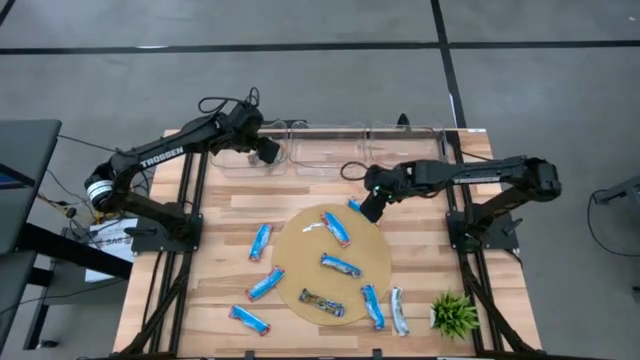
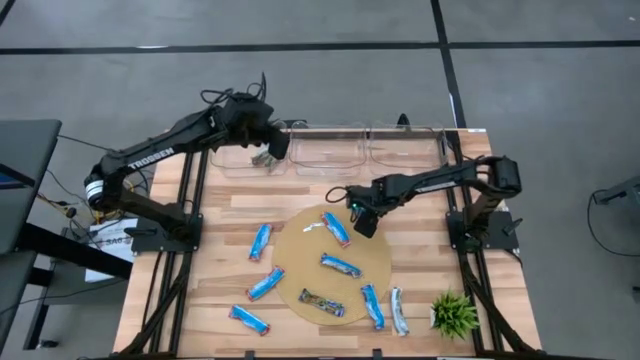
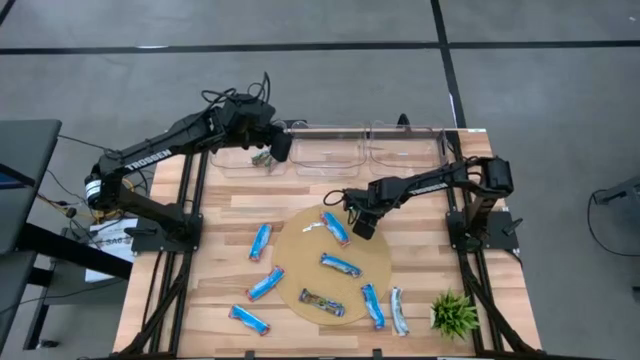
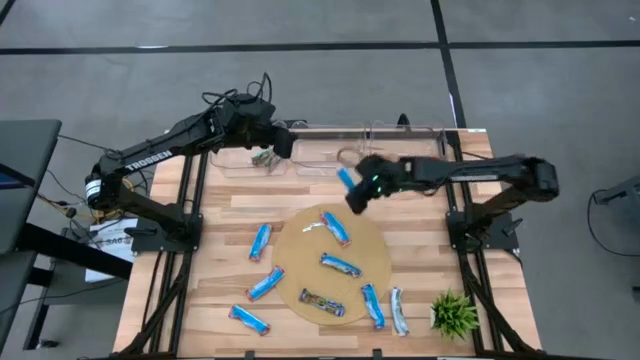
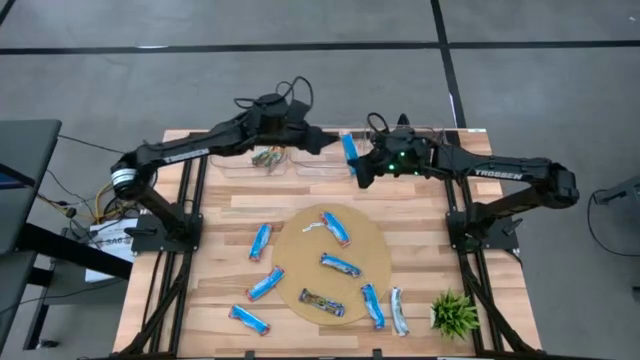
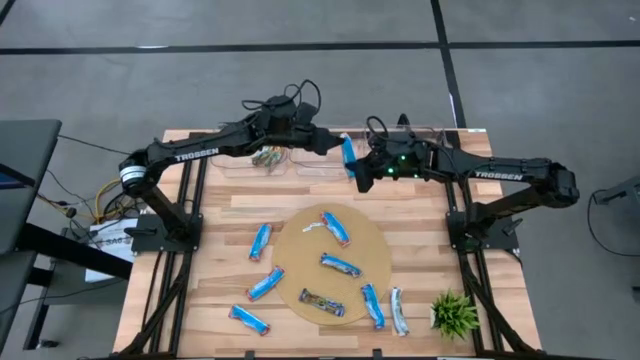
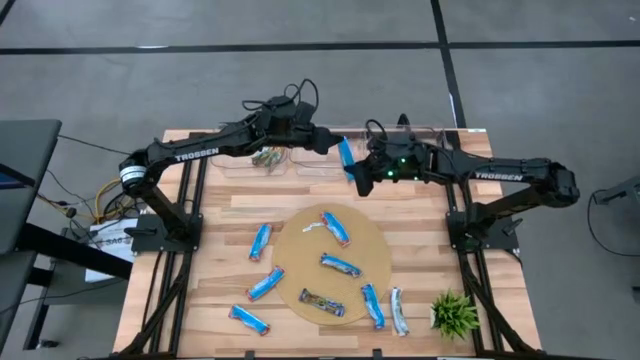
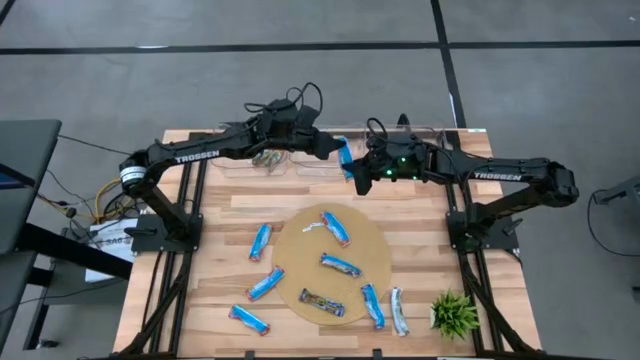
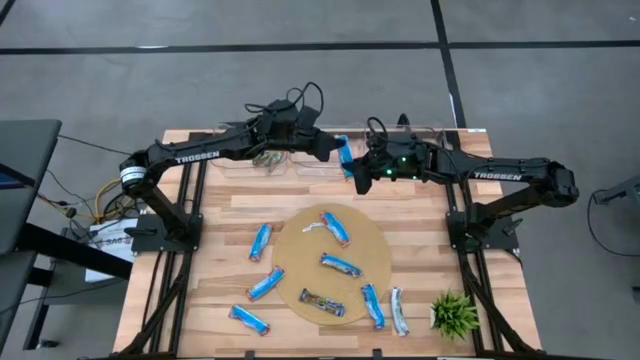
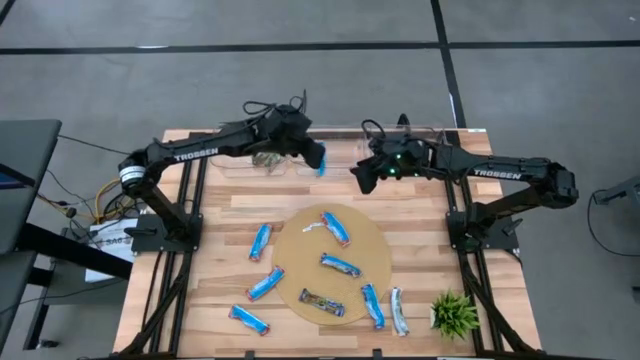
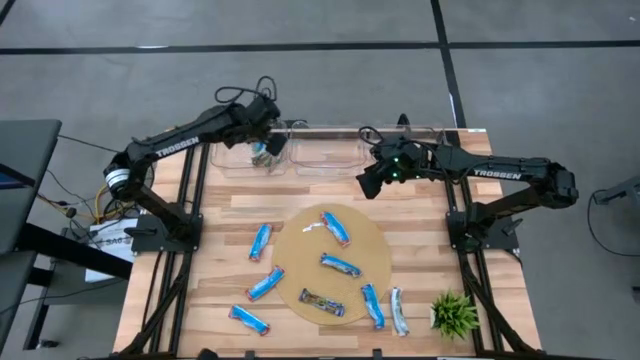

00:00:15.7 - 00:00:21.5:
Task: Pick and place Granola Bars by type
Put the yellow granola bar into the top left transparent bin

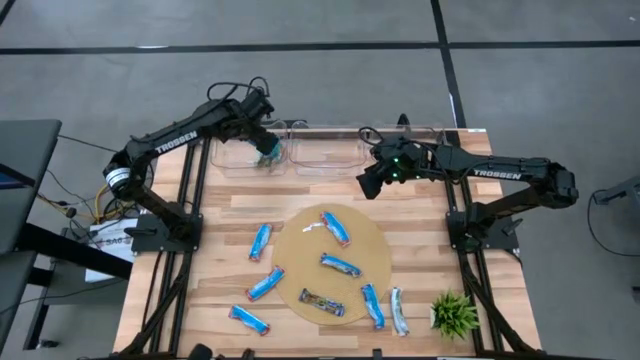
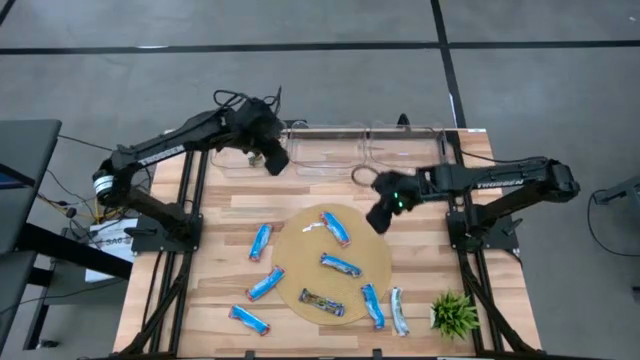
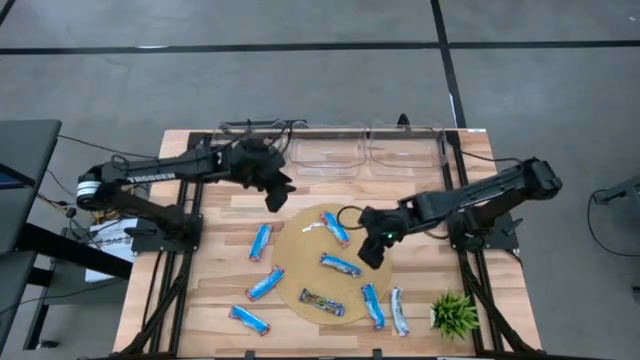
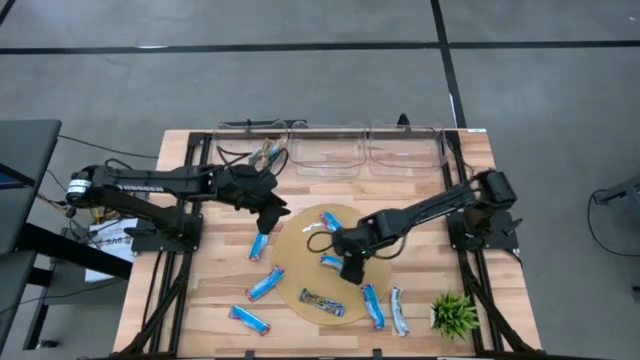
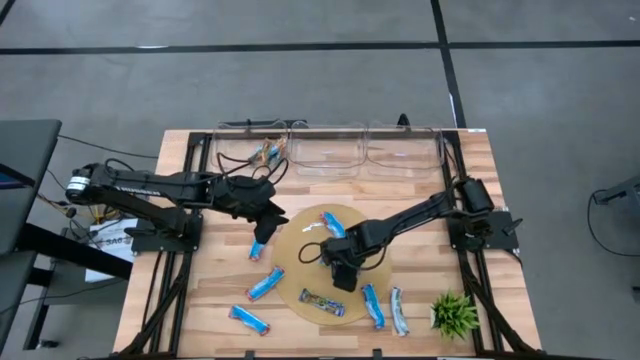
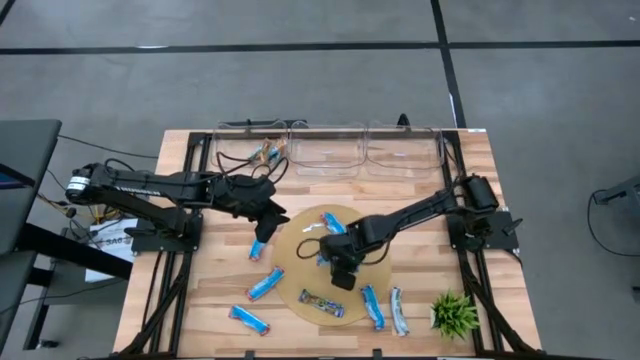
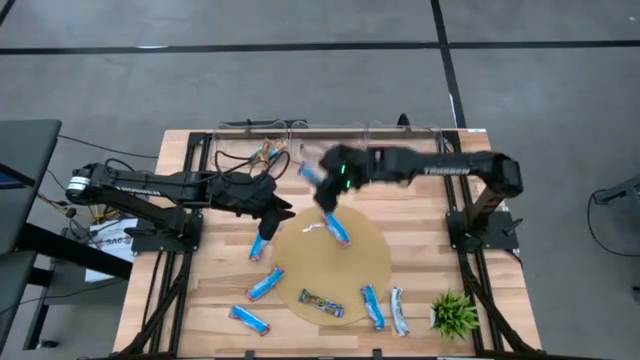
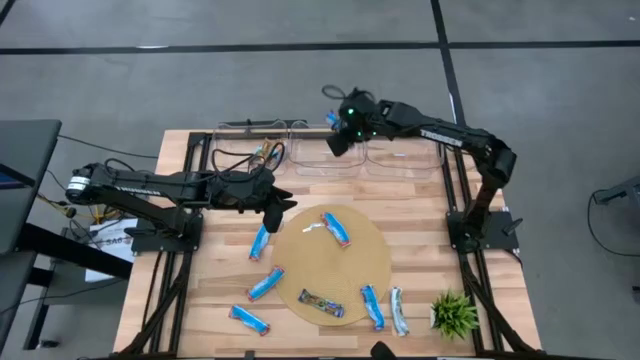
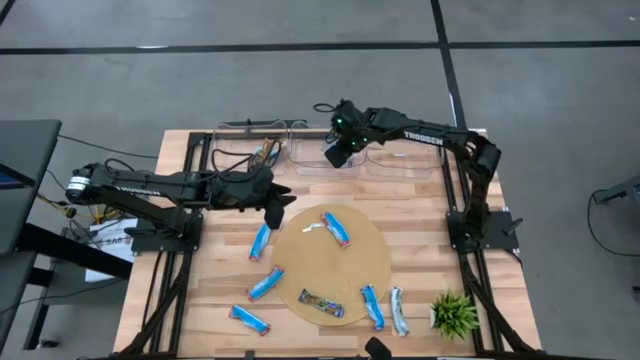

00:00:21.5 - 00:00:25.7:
Put the blue granola bar into the center transparent bin

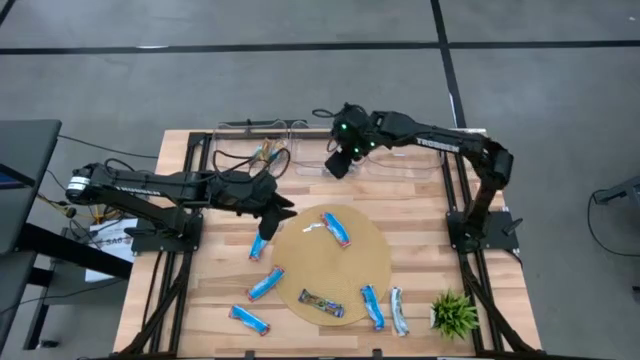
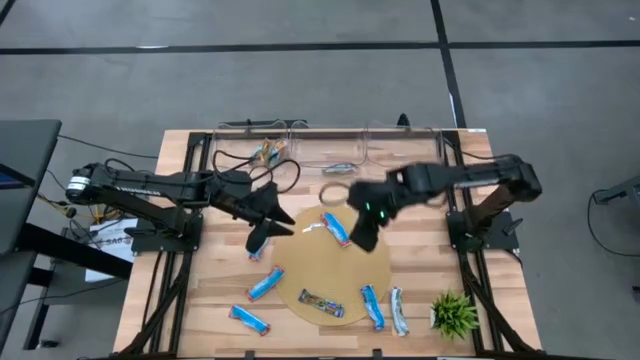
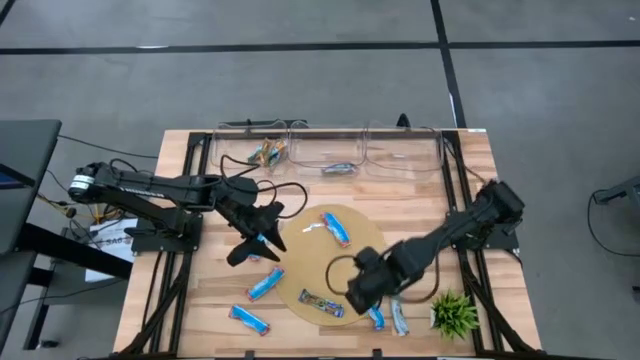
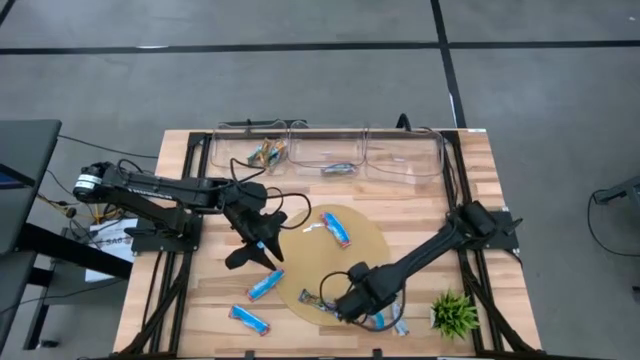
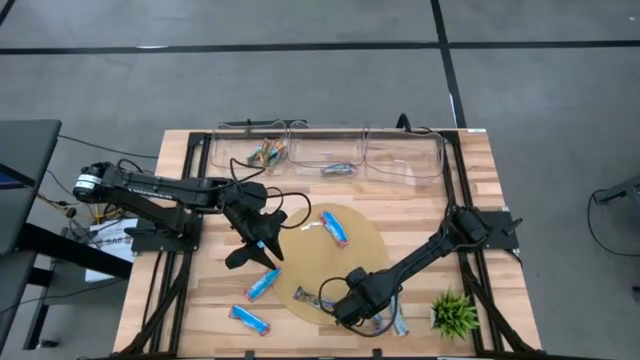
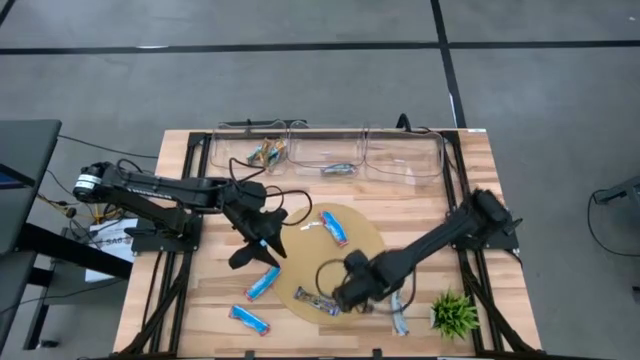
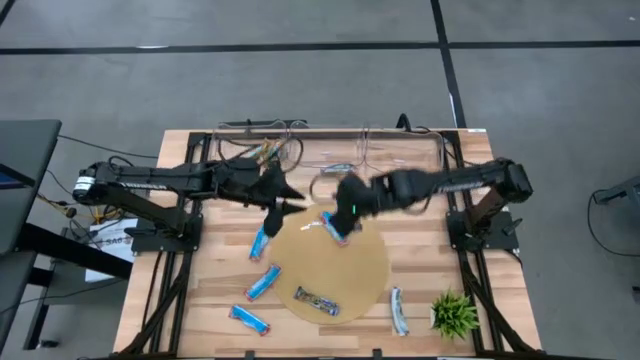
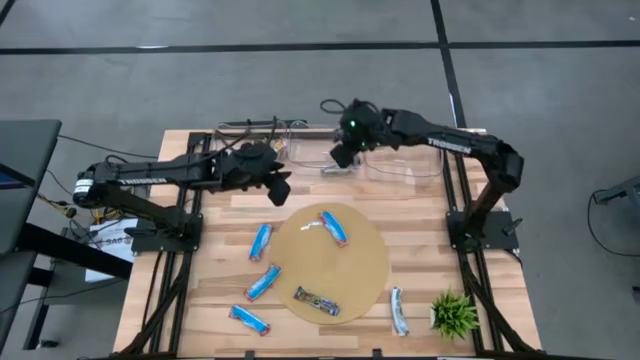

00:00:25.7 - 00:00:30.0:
Put the blue granola bar into the center transparent bin

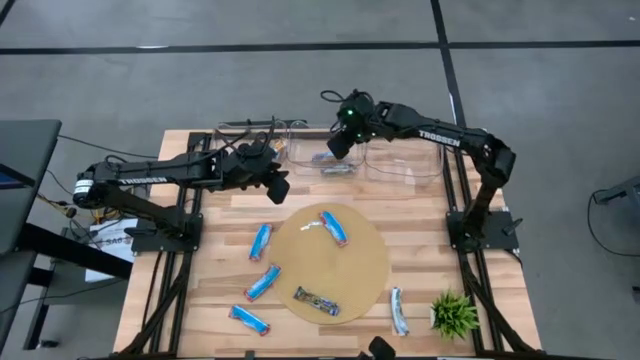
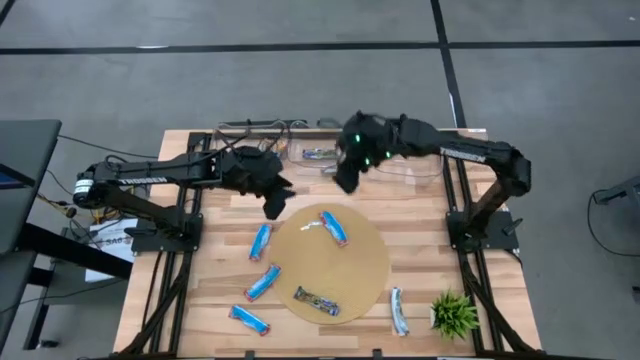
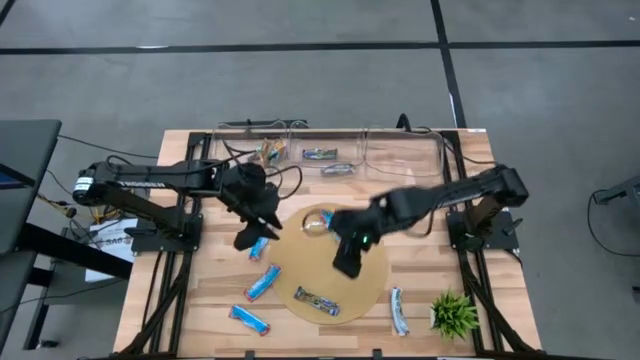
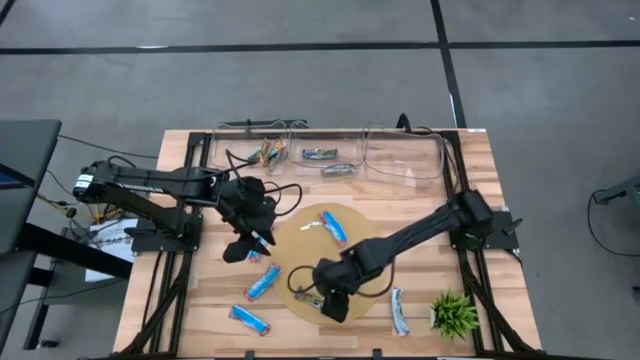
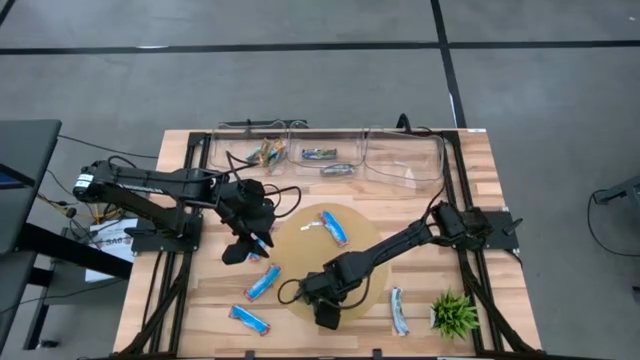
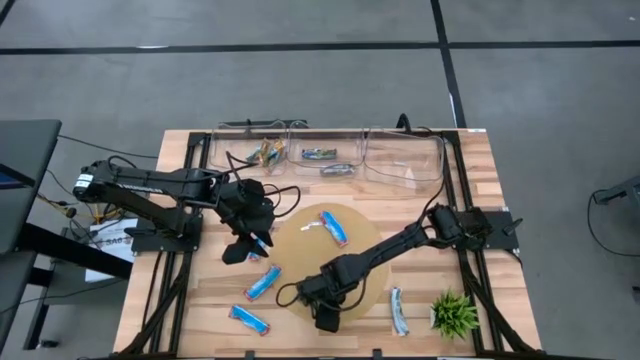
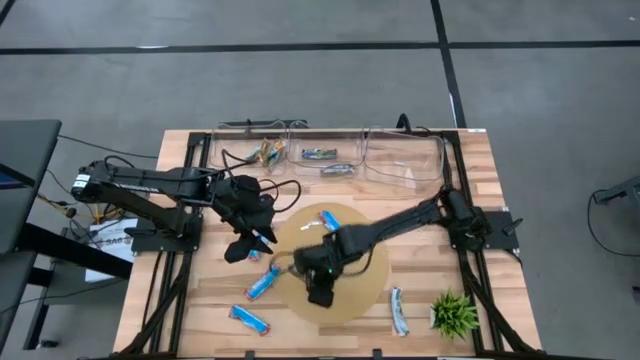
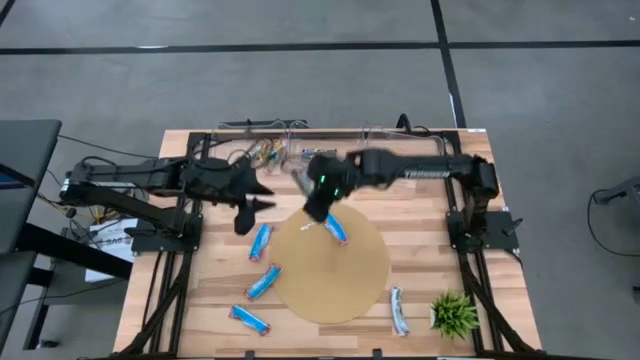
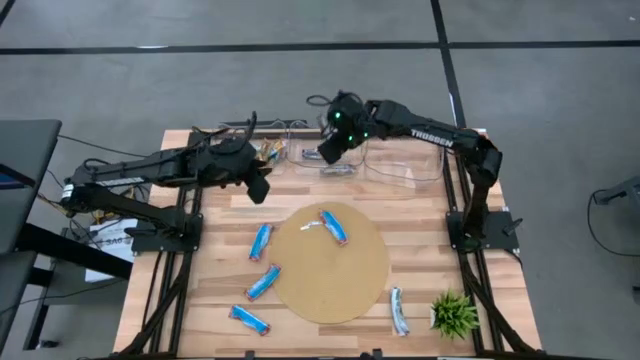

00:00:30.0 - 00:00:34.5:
Put the blue granola bar into the center transparent bin

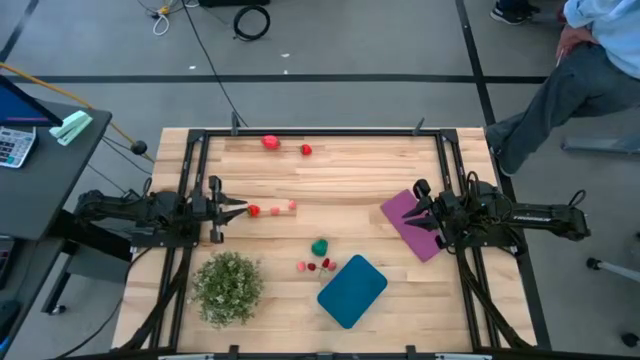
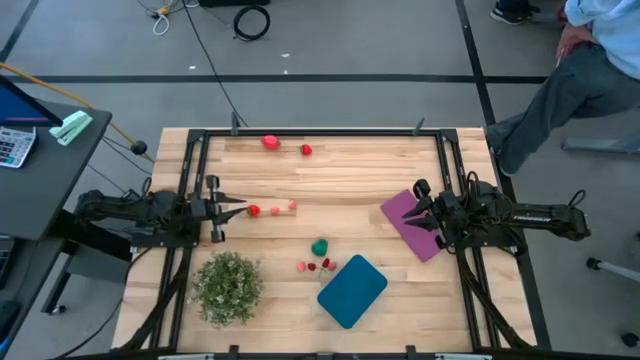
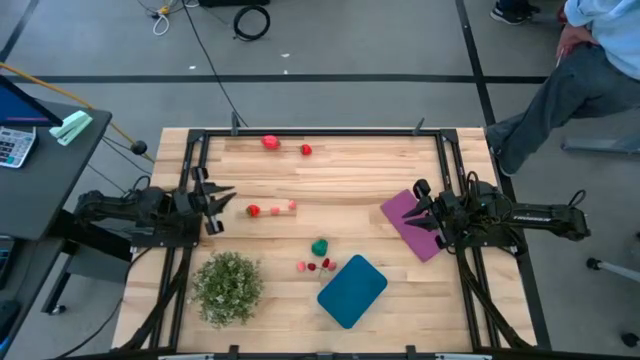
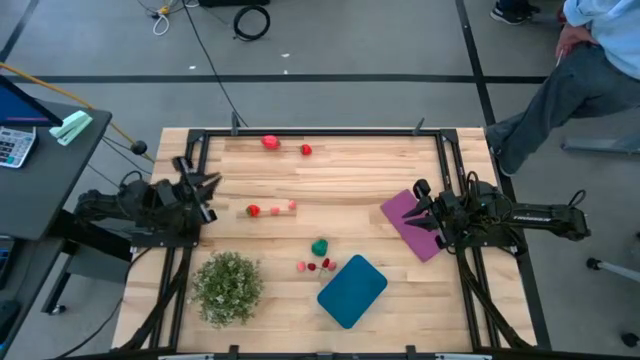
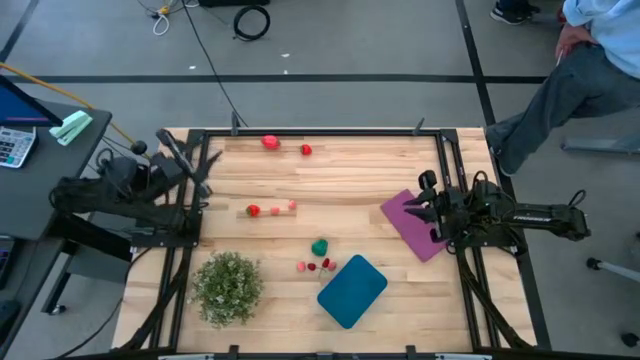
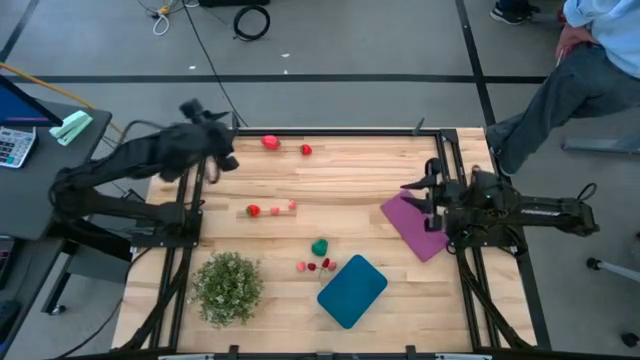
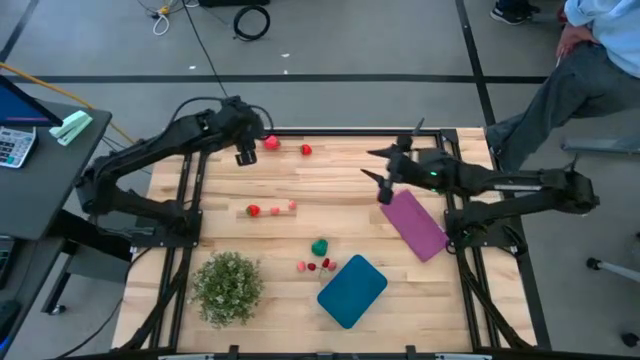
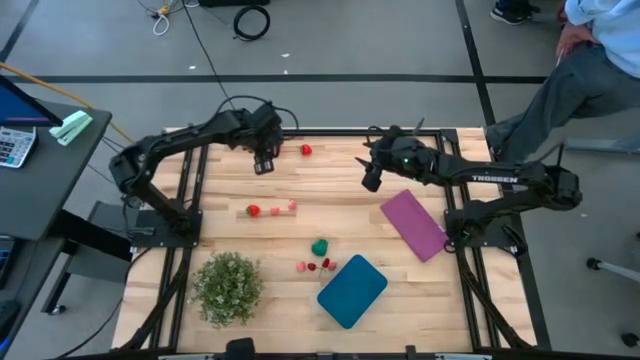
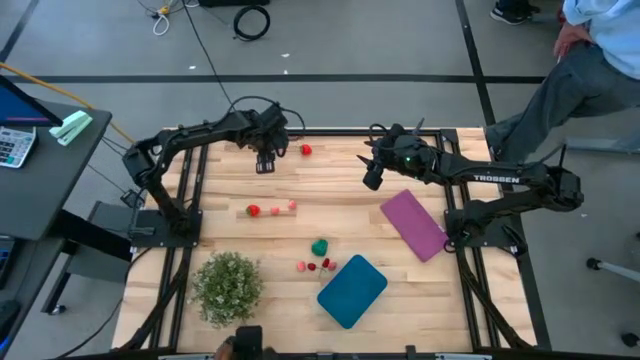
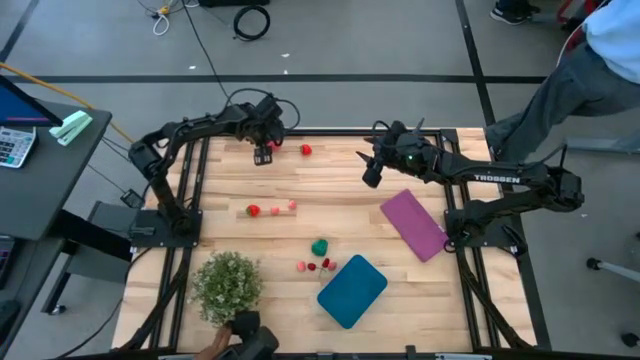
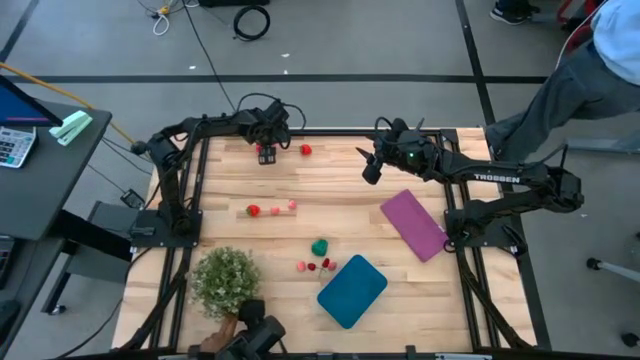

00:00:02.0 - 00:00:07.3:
Task: Pick and placing Produce into tupperware
Put the pink dragon fruit into the blue bin
